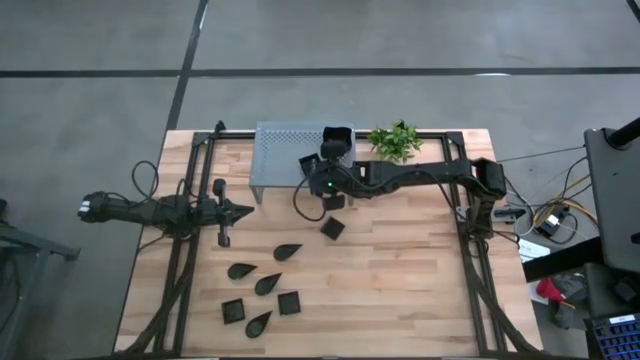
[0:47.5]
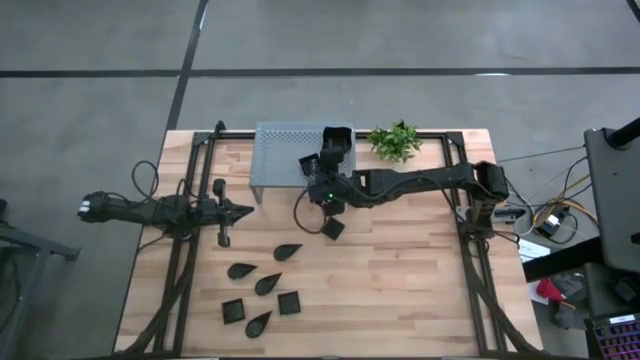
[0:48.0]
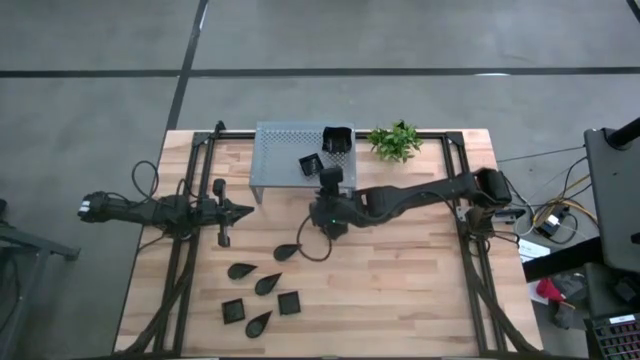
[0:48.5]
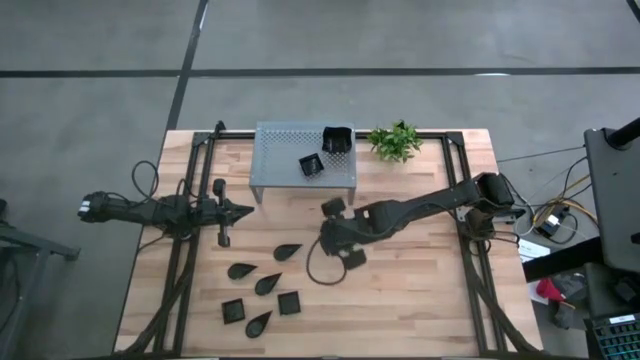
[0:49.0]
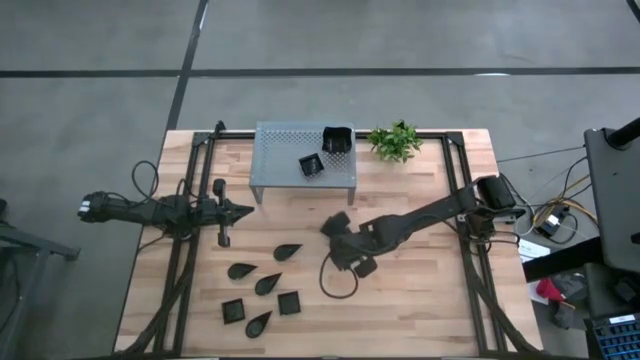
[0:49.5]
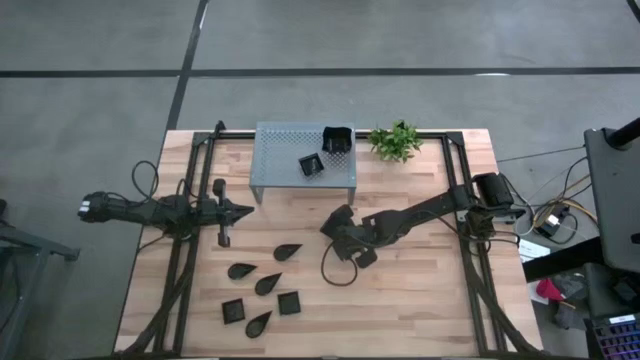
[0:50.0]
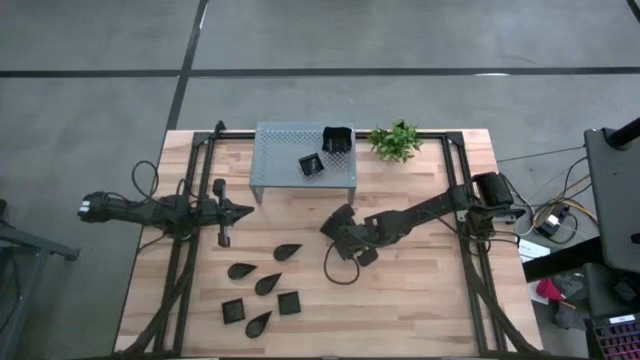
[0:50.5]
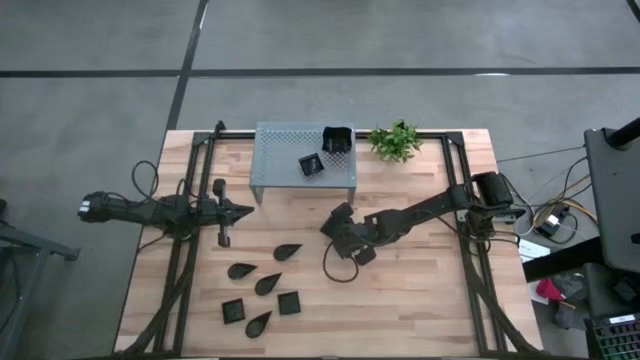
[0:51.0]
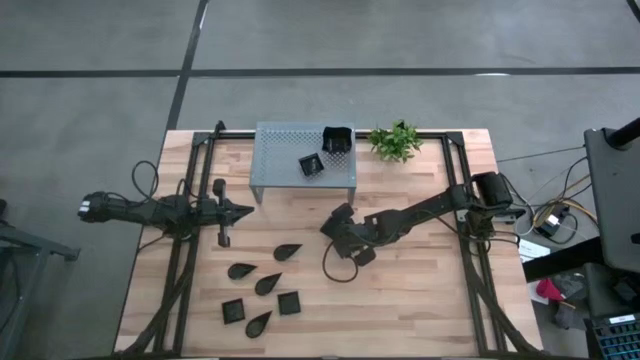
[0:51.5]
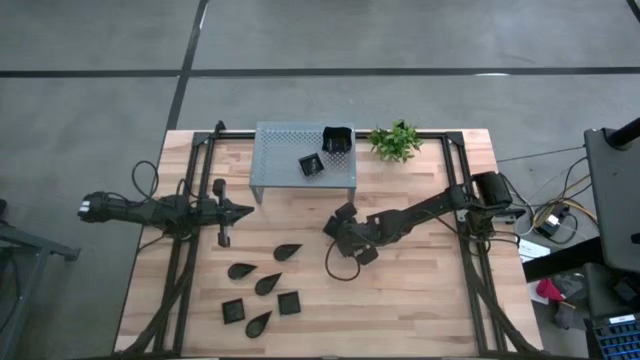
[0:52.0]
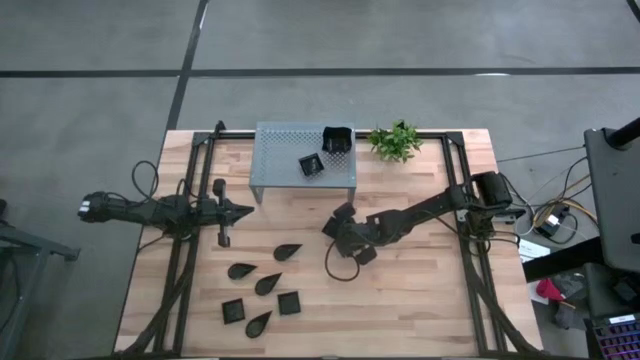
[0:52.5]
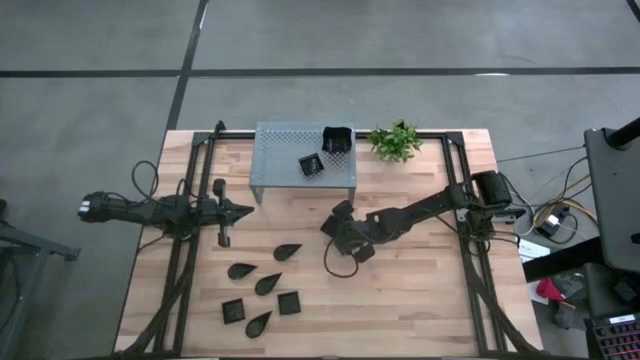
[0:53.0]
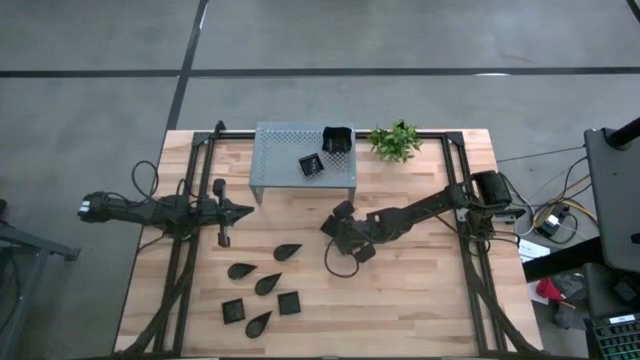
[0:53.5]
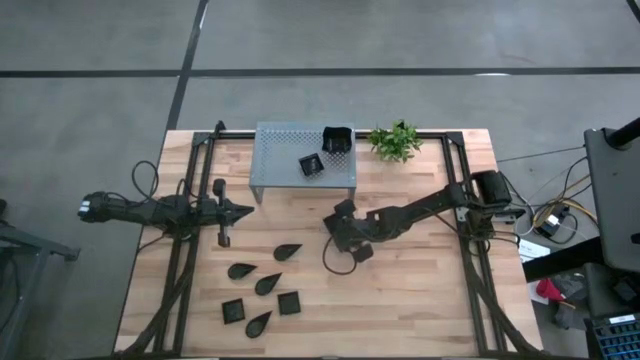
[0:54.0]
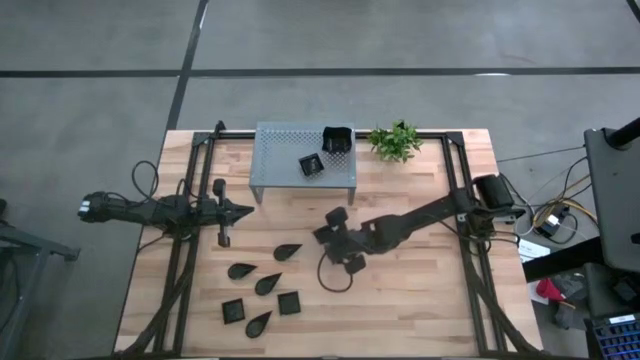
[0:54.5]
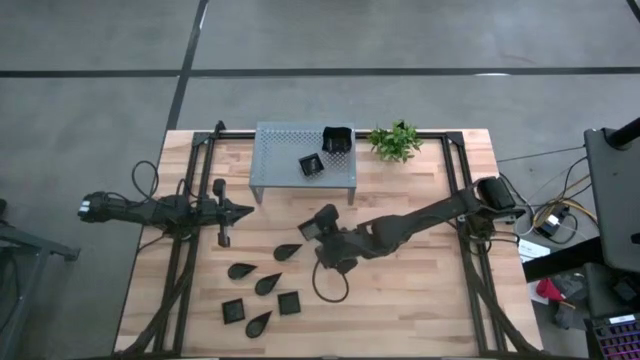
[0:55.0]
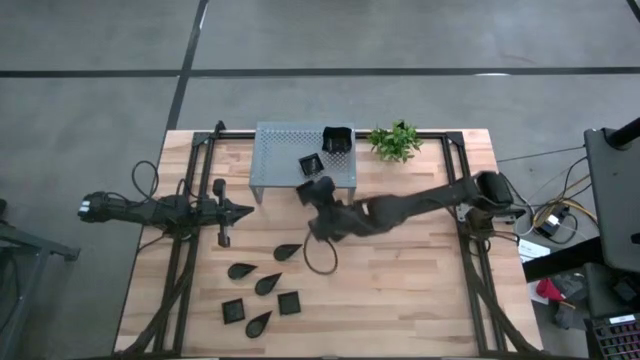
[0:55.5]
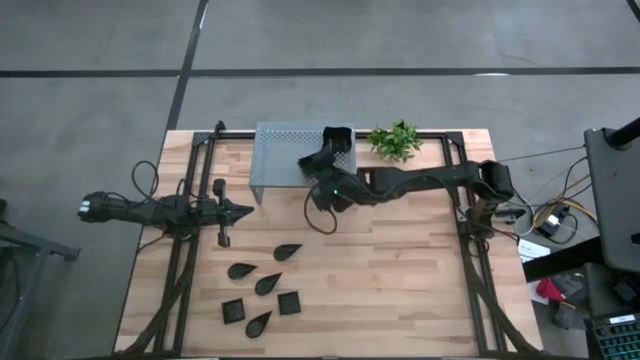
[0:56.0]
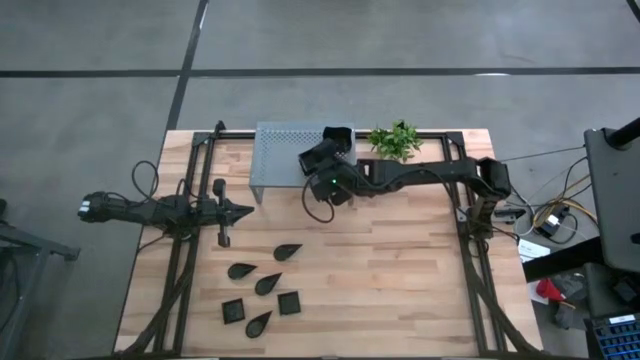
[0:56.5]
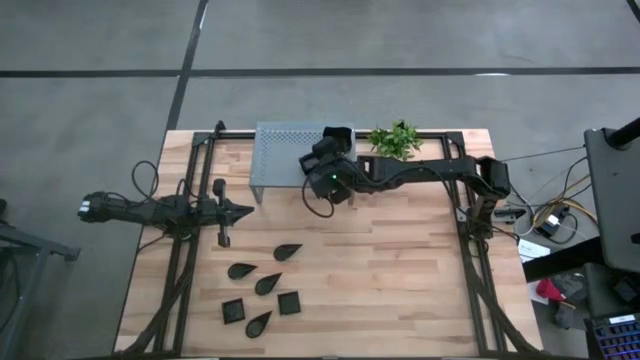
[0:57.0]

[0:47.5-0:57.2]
Task: Pick & Place Mini shaped plates
Stack the black square plate on top of the black square plate on the shelf

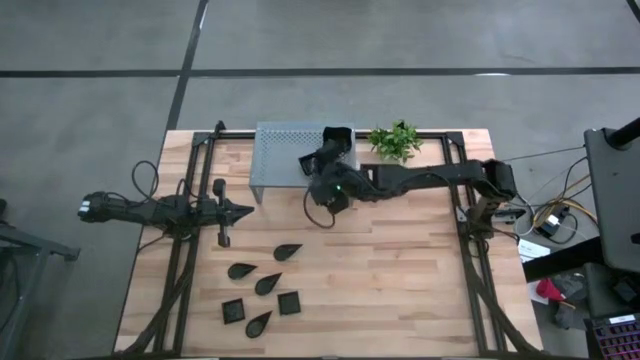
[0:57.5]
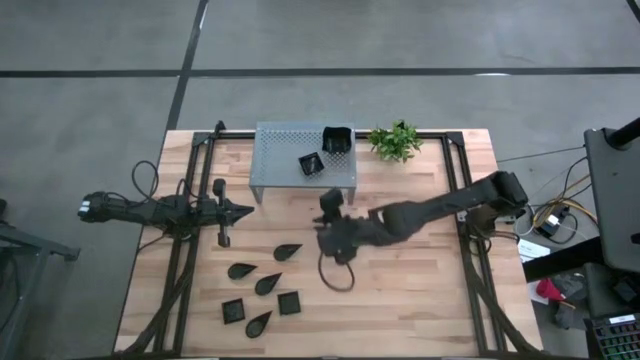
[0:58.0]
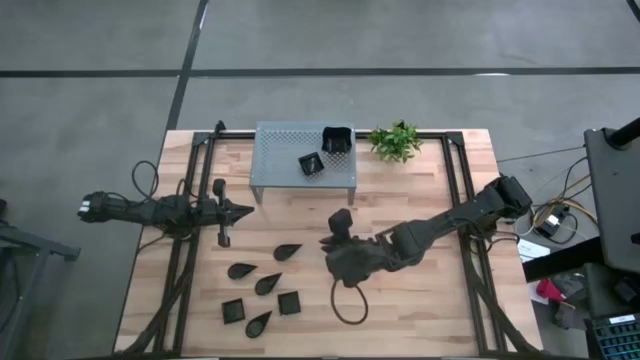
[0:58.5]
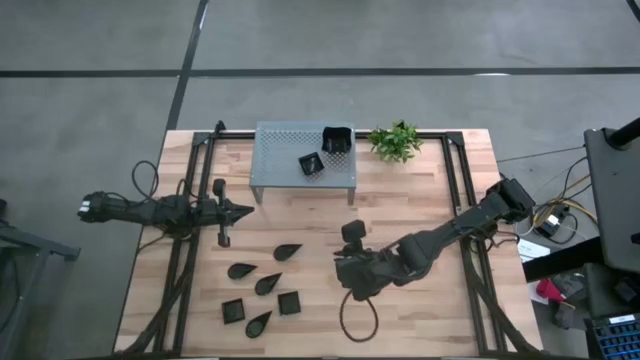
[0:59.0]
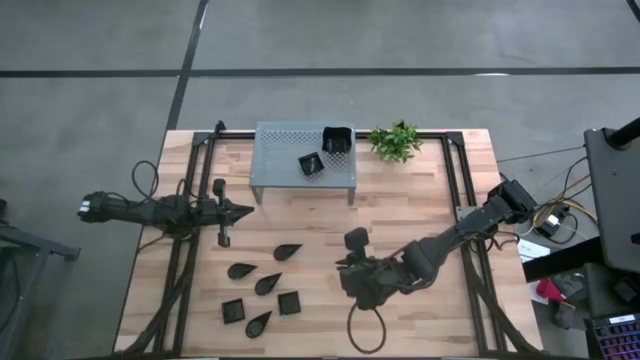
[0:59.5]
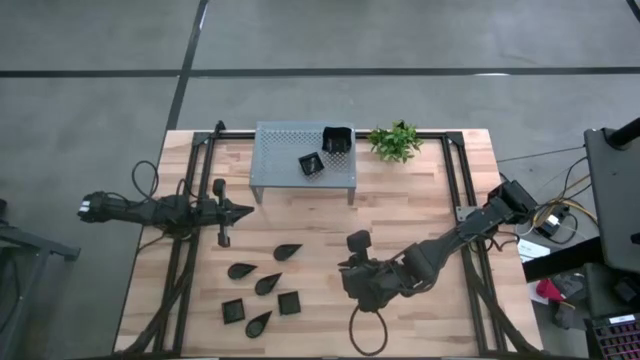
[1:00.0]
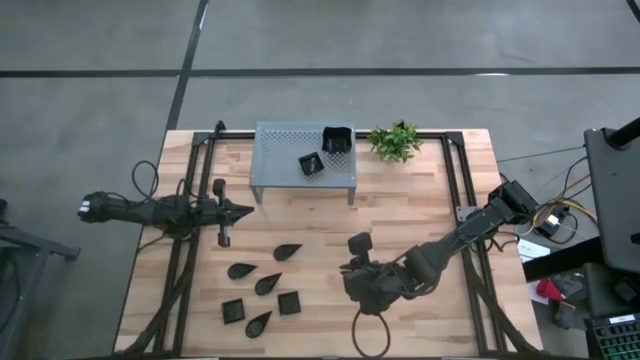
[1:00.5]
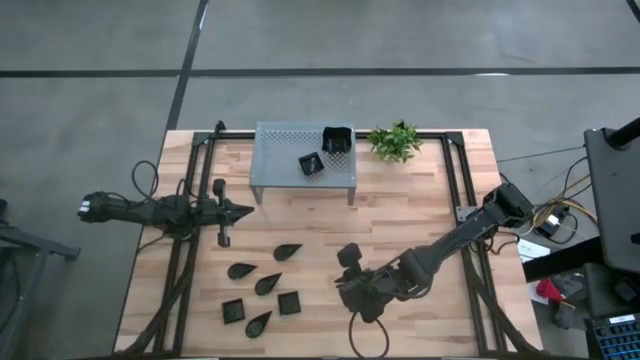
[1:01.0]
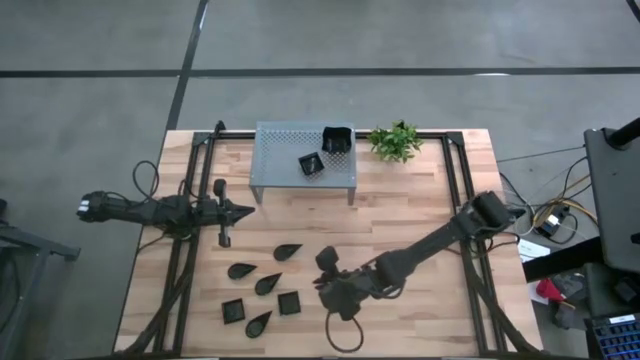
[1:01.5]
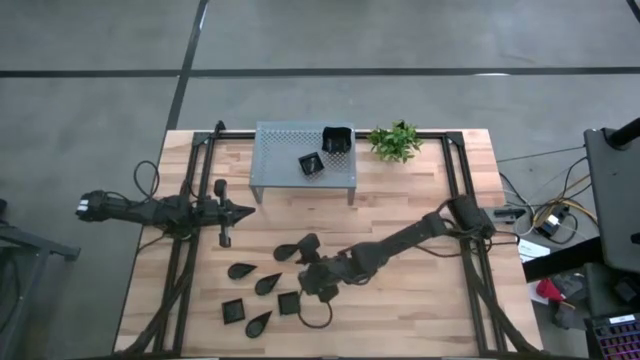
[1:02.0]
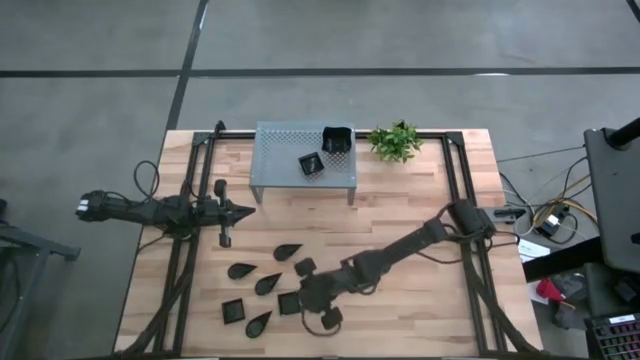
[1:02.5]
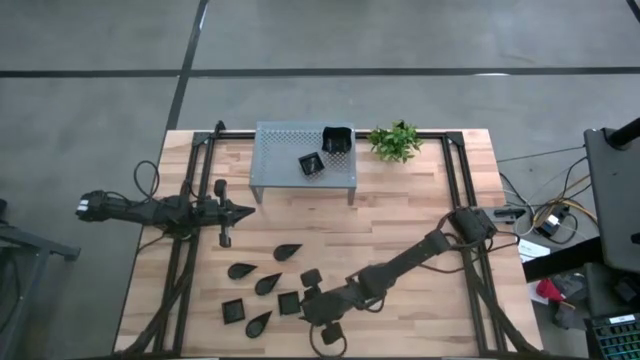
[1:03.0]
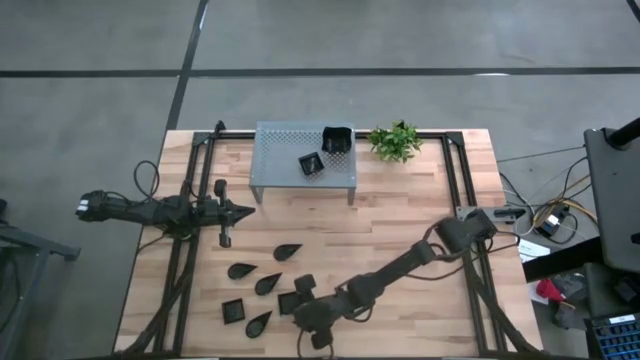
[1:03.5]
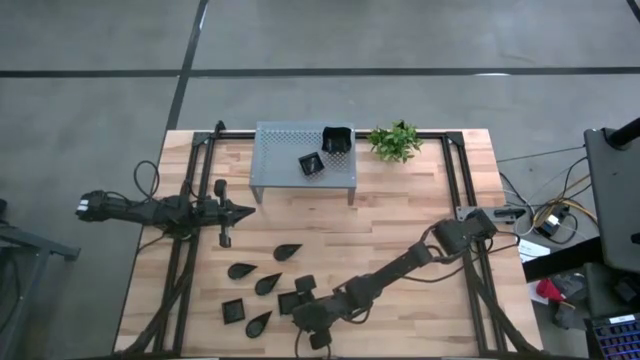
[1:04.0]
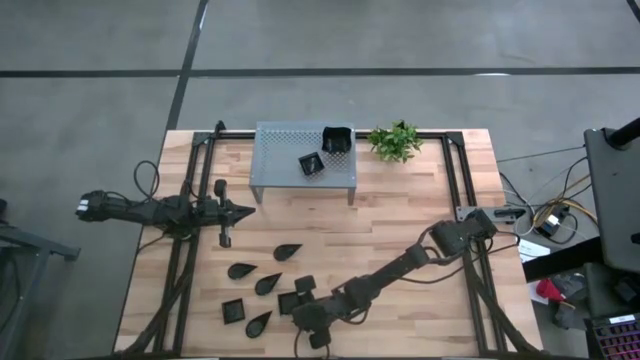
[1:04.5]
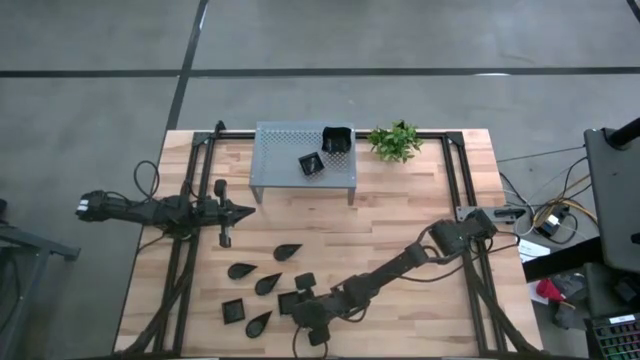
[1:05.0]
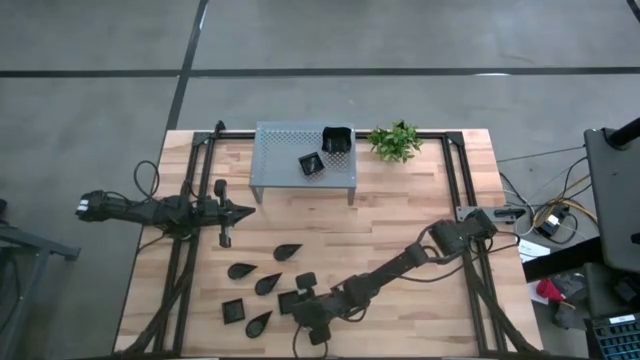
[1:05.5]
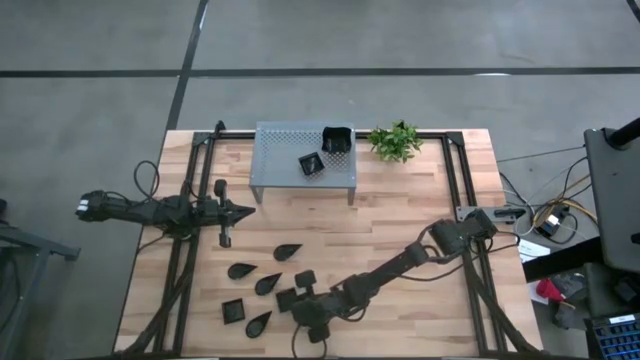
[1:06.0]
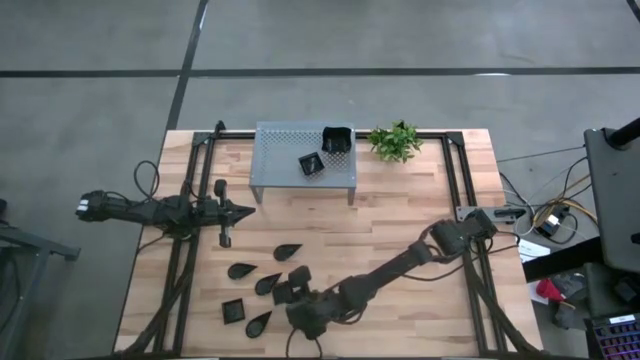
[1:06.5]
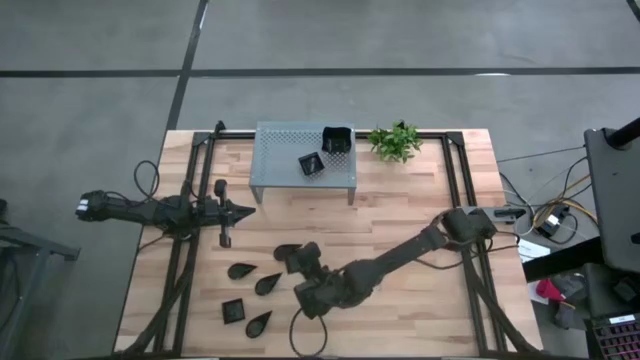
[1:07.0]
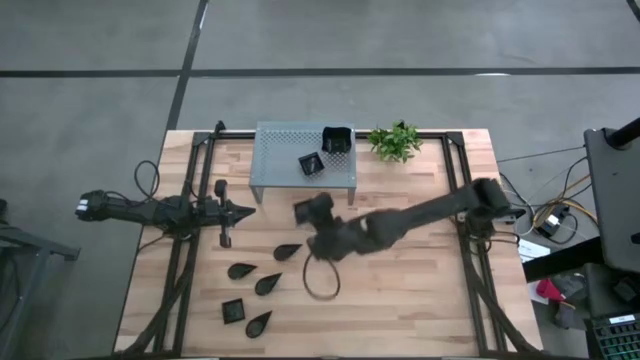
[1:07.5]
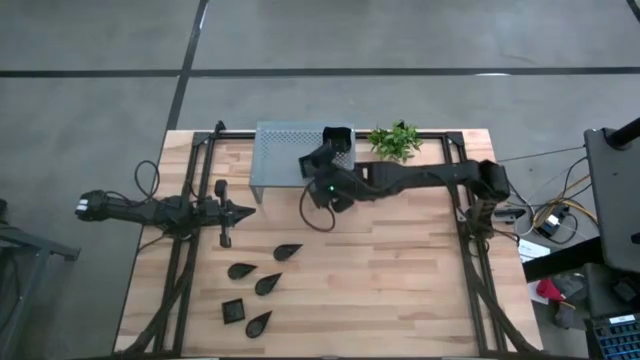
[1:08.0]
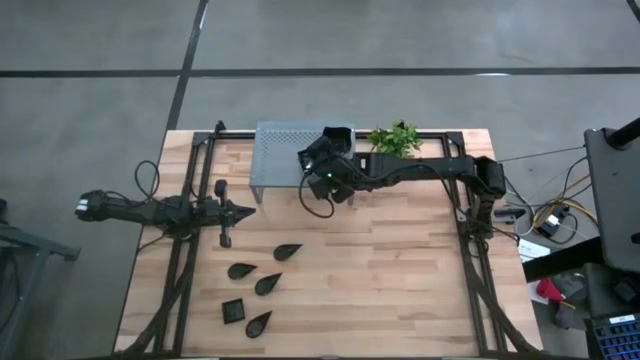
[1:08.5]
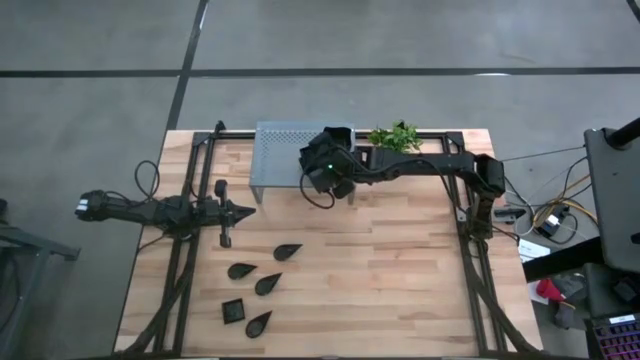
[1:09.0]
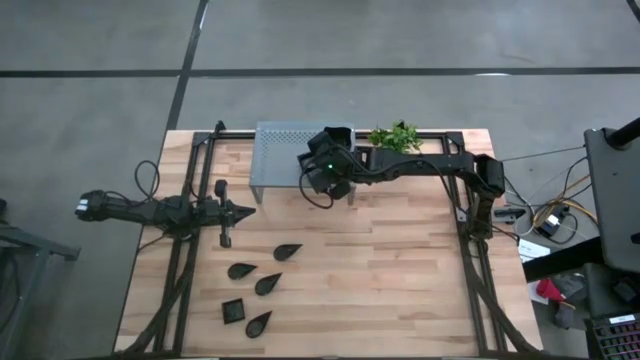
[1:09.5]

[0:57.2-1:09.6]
Stack the black square plate on top of the black square plates on the shelf
